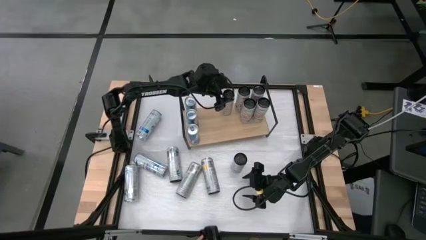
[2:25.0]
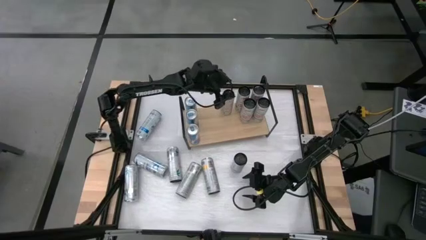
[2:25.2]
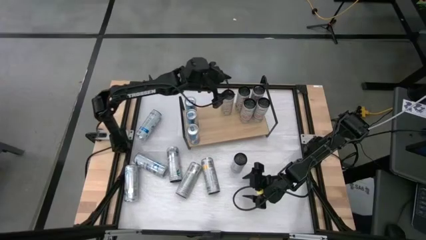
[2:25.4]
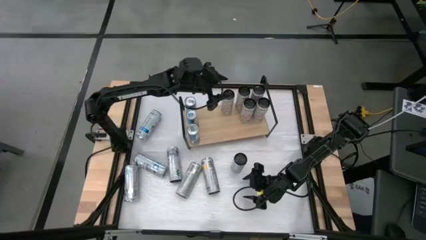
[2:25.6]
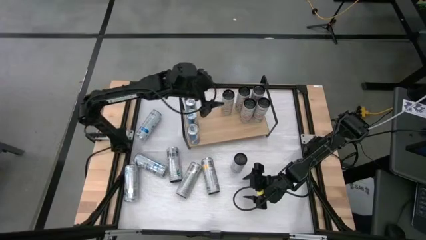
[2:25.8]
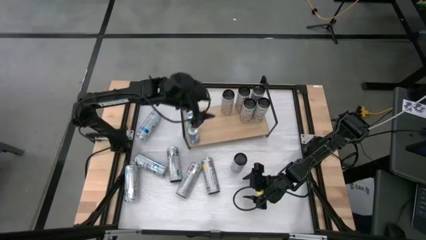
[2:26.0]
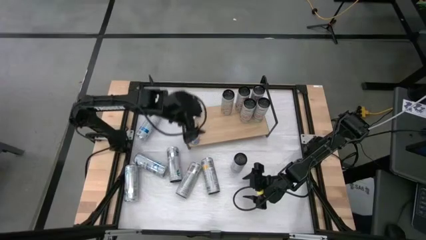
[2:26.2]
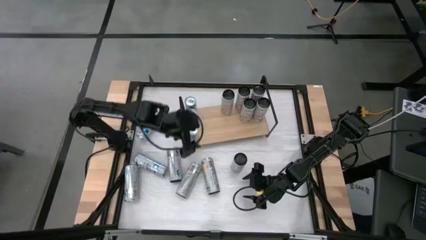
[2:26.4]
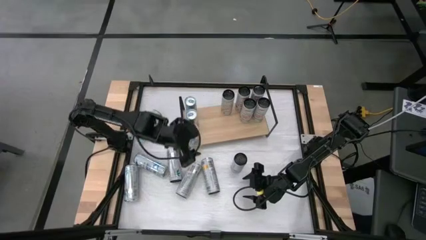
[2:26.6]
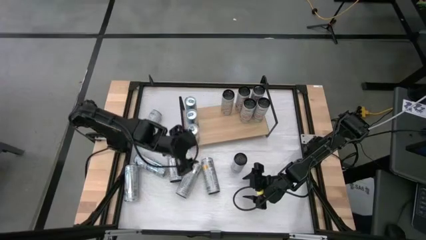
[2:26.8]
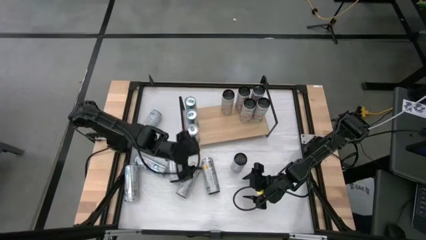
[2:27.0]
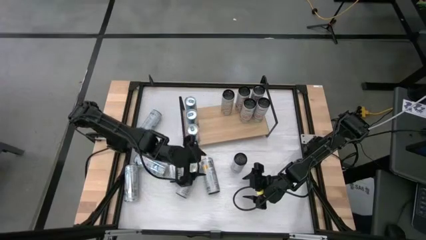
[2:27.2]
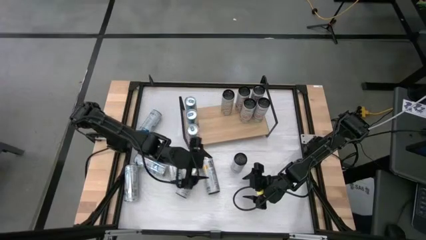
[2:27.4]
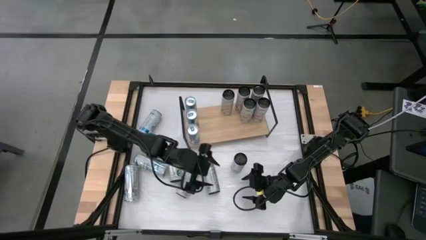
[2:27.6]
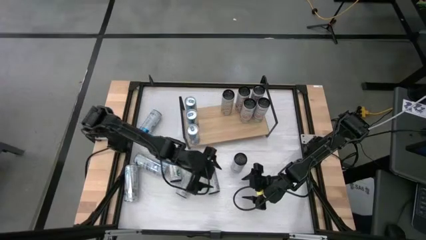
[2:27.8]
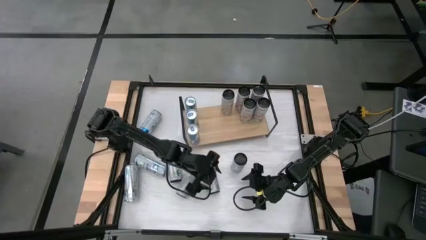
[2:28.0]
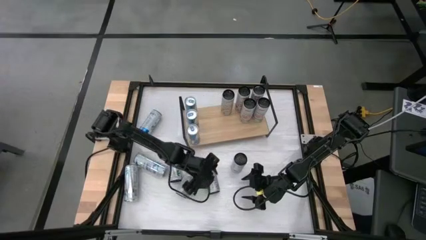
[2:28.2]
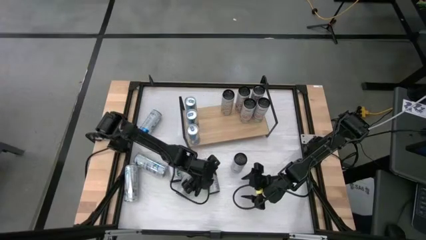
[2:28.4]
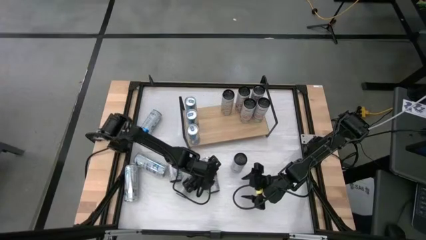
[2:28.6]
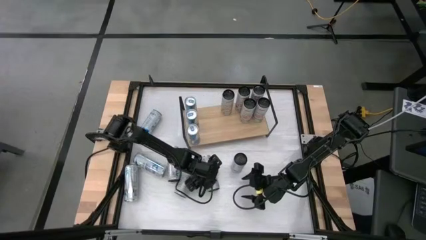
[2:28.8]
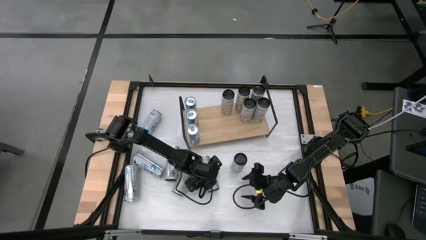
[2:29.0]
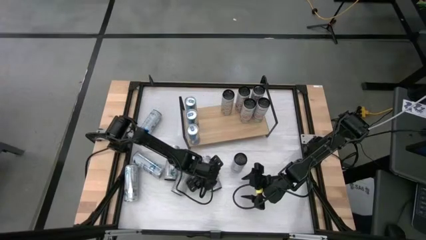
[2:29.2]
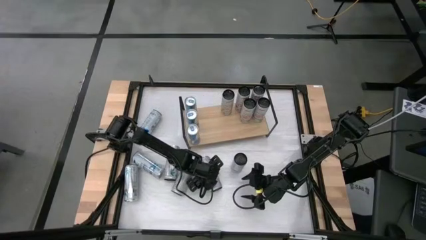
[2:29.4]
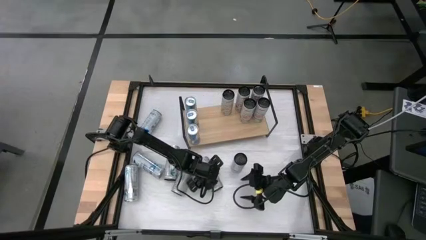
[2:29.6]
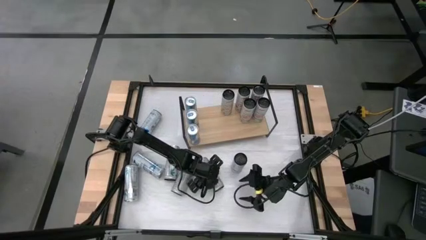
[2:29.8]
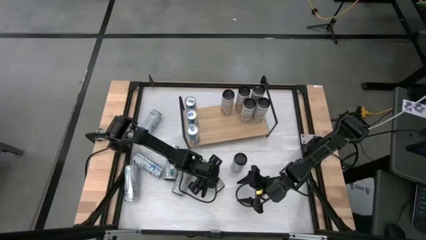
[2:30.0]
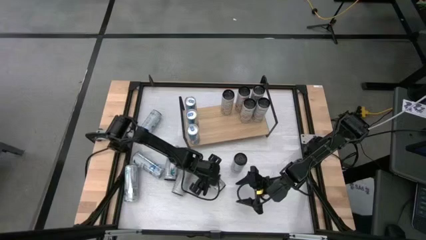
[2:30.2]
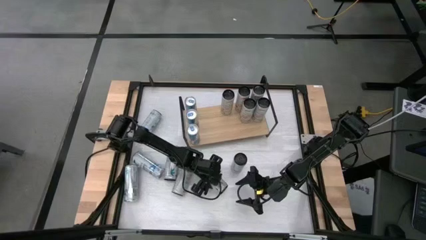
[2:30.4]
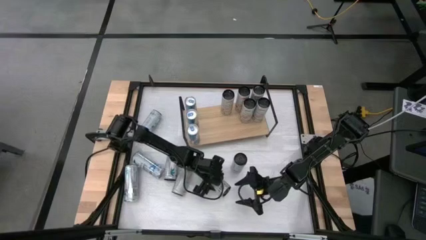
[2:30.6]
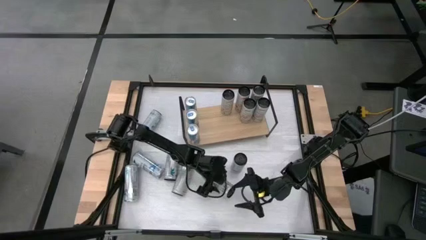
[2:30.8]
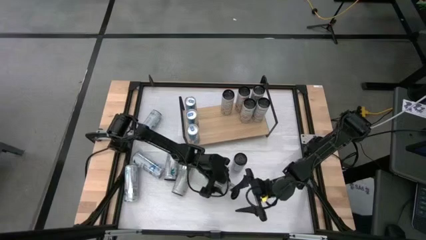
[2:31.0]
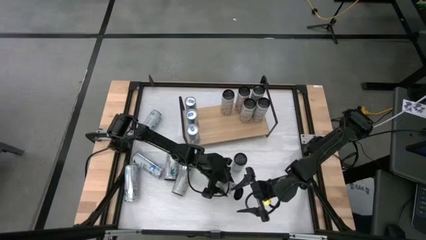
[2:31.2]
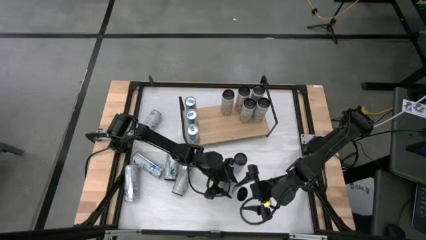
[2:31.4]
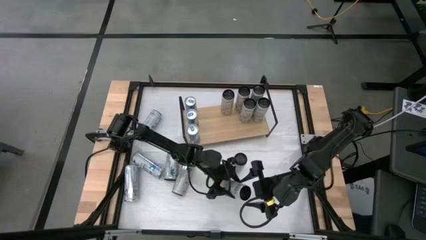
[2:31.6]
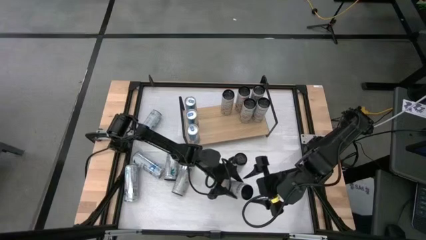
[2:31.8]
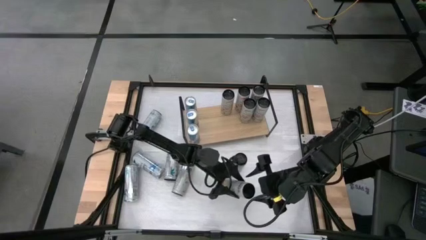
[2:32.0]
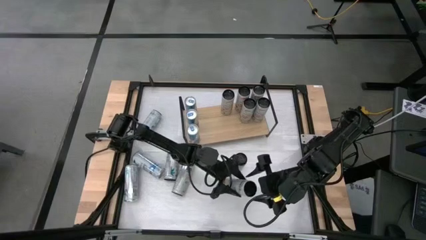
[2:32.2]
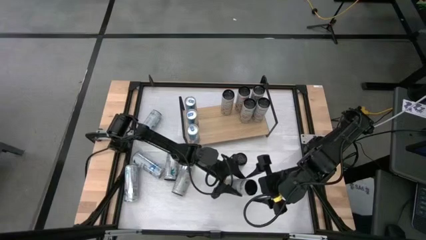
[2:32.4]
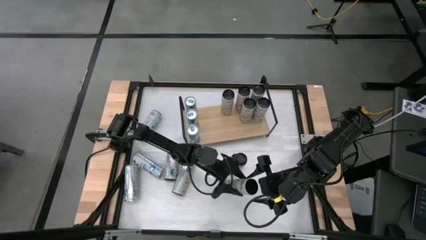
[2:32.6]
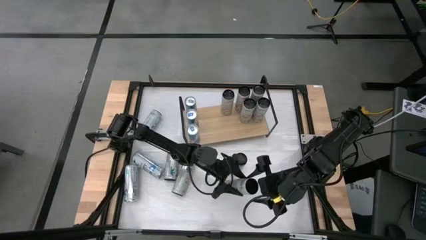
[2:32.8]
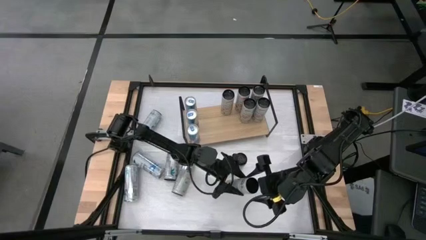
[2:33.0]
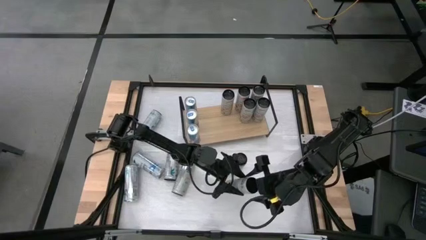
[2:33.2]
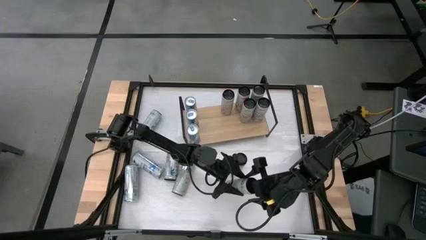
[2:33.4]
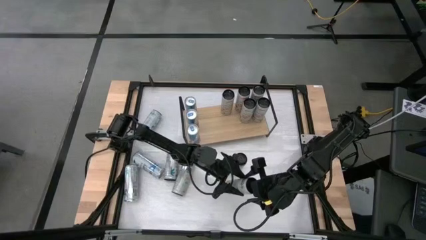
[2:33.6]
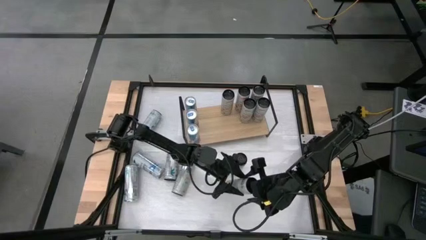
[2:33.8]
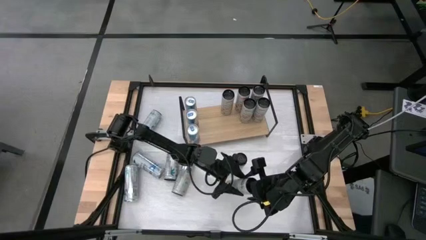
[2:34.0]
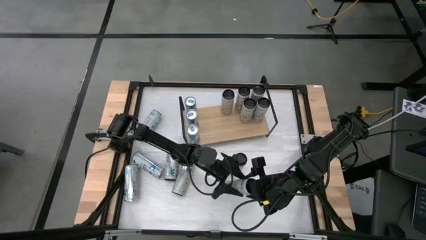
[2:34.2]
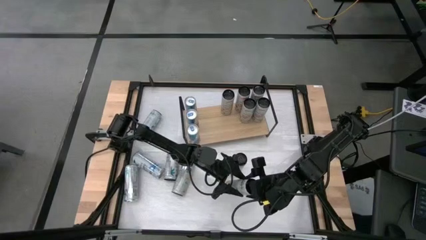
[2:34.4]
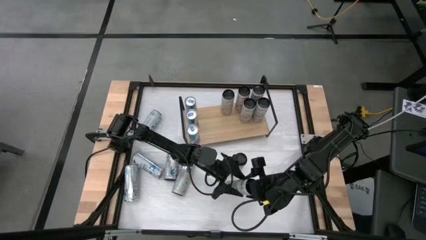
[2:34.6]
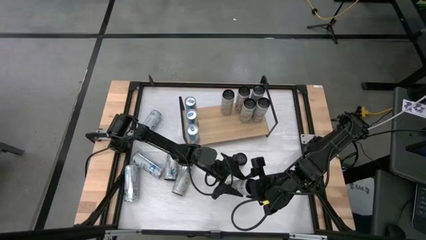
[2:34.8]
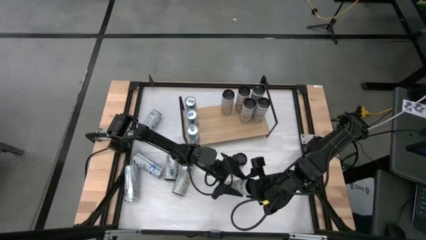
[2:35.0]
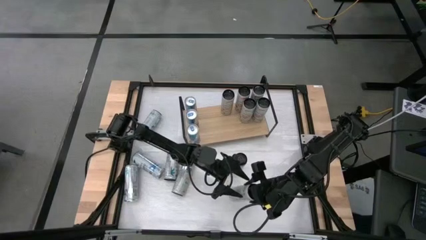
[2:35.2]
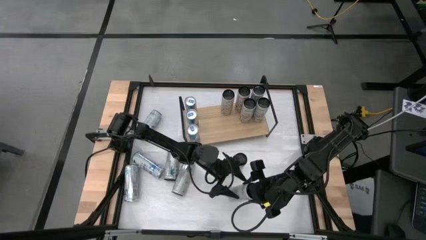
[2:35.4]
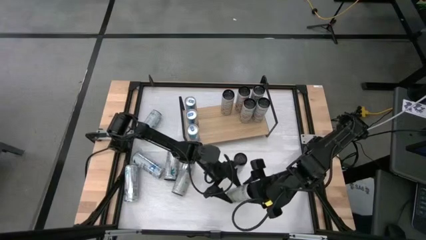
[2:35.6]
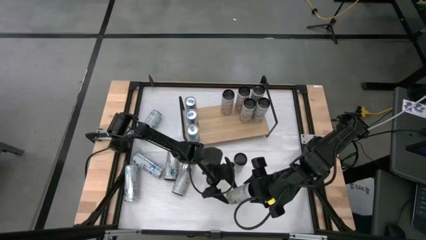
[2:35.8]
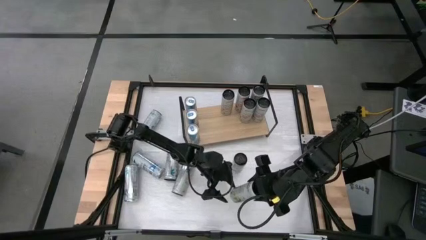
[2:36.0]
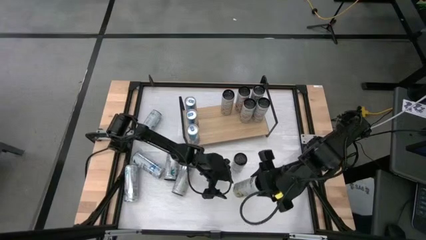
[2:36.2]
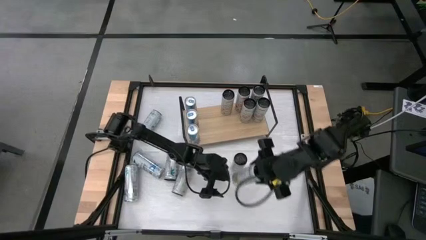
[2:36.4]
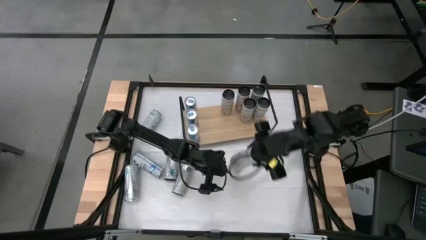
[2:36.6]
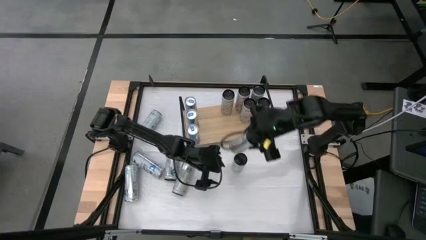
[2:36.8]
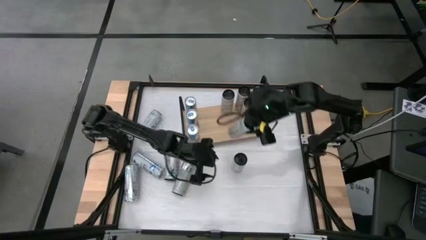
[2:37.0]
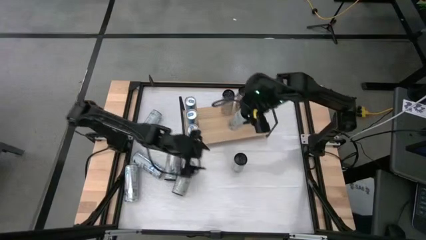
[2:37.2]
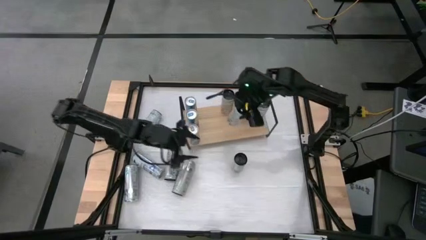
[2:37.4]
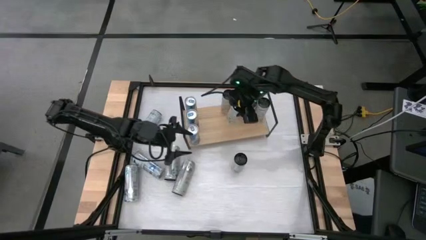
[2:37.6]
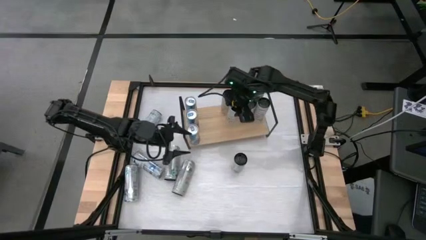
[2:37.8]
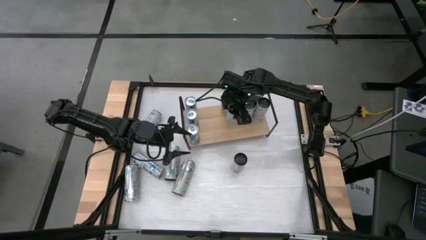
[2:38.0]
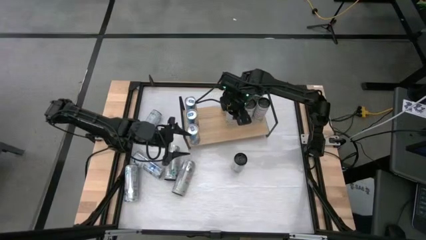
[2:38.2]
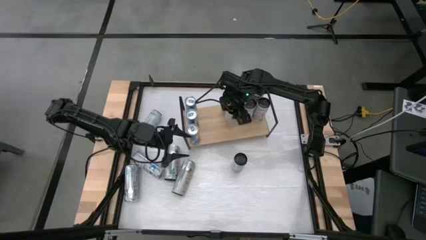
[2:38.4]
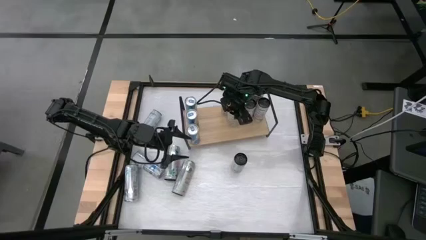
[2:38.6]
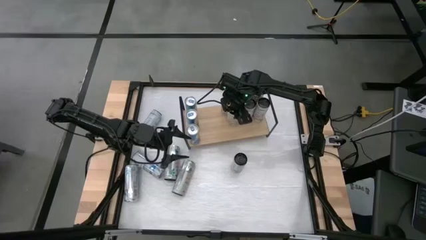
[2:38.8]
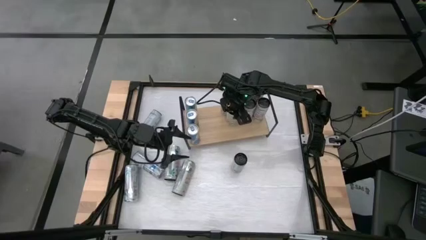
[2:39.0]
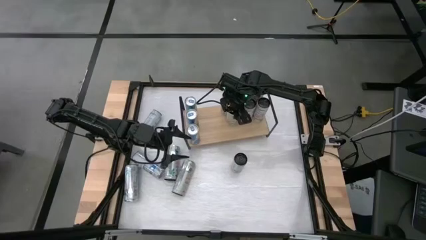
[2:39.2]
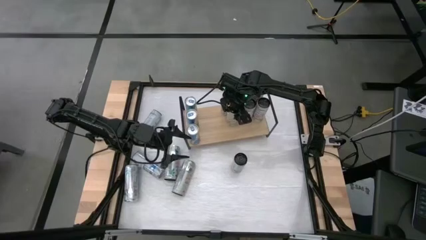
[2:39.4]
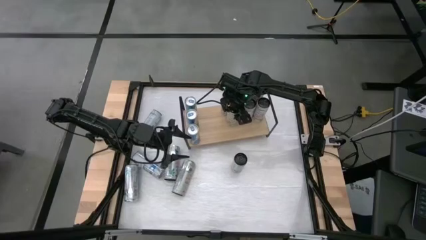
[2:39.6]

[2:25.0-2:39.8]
Task: Place canned beverage on shelf
Put the white-yellow soda can on the shelf aligned with the other white-yellow soda can

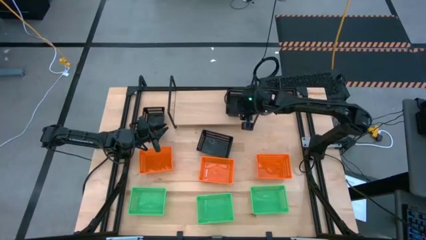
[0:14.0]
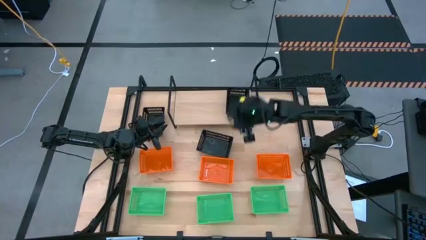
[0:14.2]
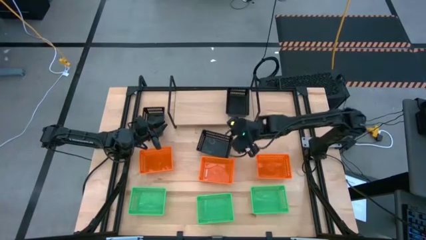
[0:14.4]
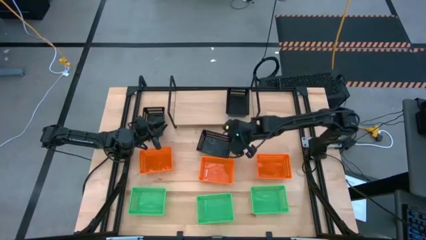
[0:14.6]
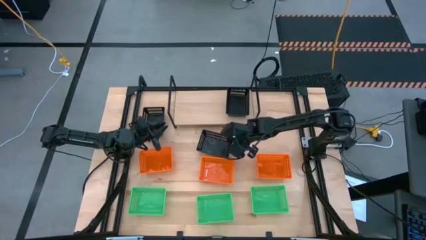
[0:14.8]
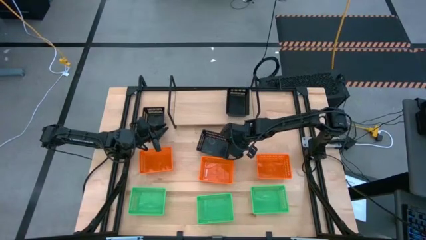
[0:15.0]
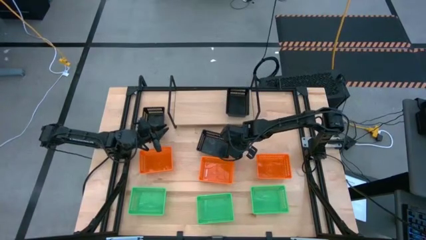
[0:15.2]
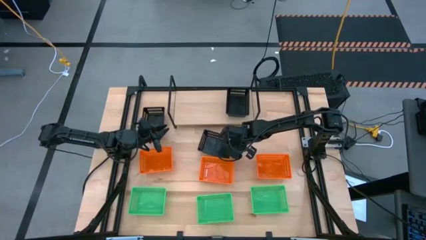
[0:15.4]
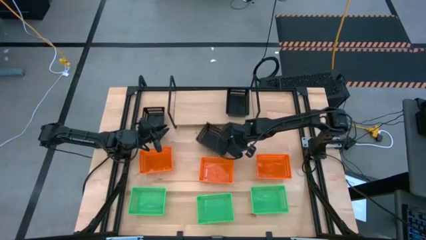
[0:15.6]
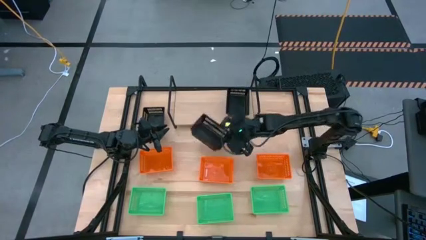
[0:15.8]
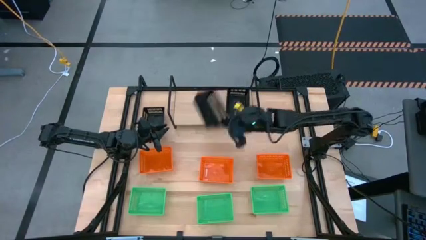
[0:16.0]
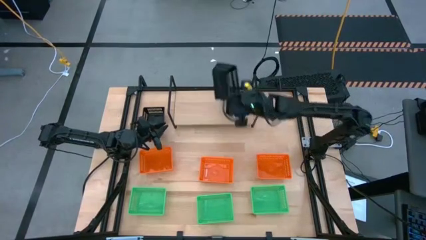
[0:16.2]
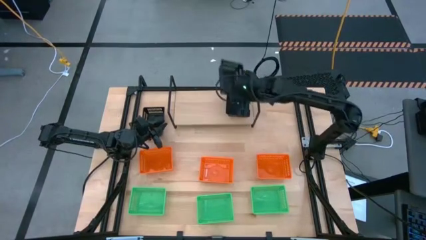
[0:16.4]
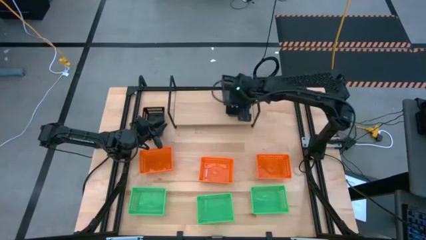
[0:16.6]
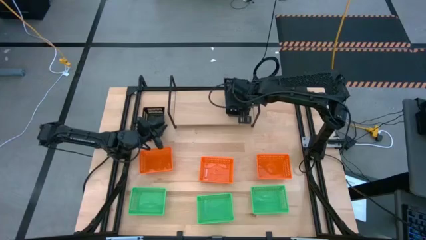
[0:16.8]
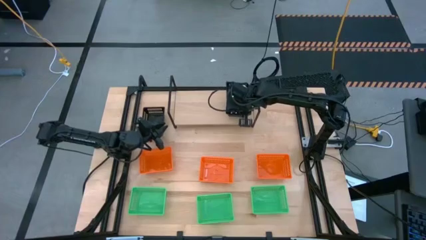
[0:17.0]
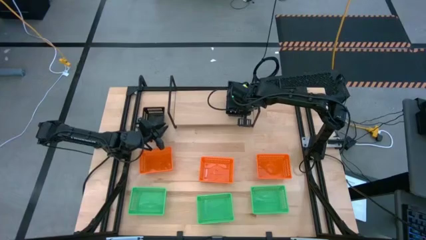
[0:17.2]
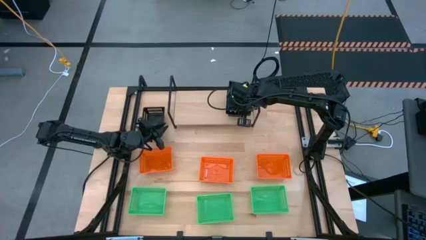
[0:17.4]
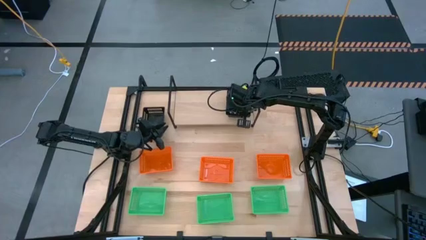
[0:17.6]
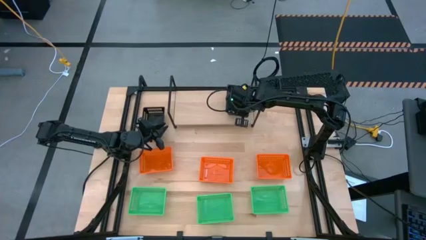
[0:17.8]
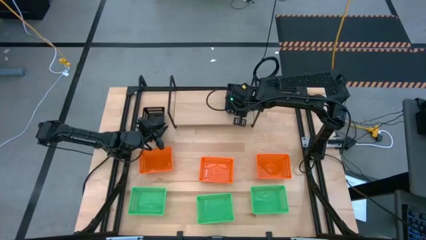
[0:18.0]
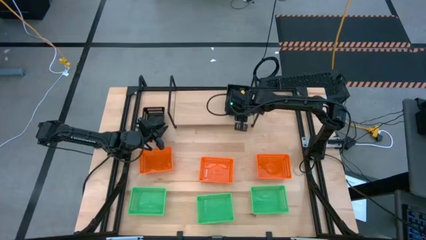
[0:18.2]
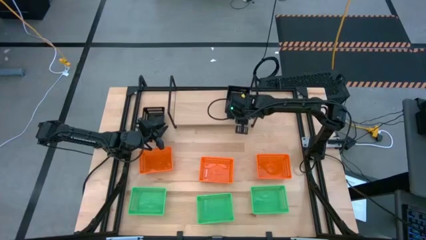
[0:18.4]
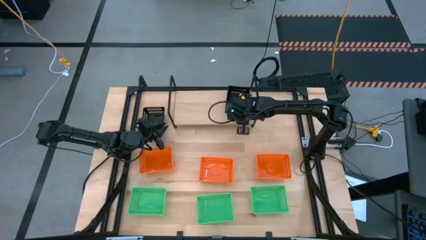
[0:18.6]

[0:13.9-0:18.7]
Task: Stack baskets on shelf by color
Stack the bottom black bin on the black bin on the shelf
